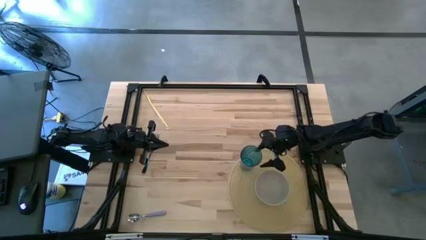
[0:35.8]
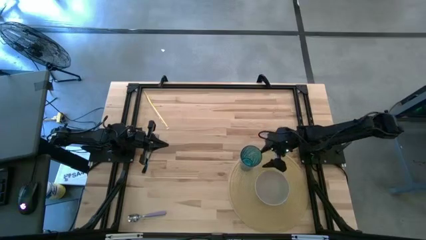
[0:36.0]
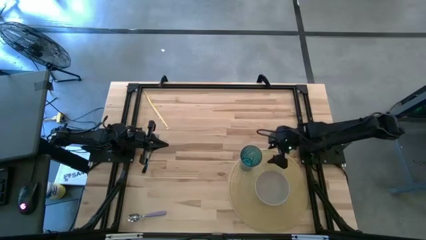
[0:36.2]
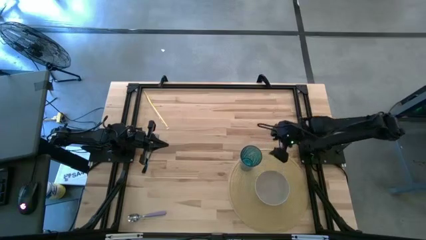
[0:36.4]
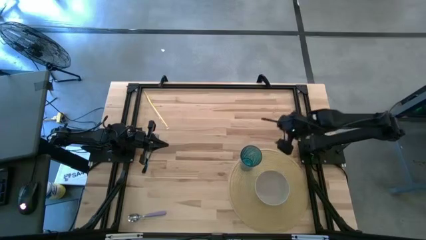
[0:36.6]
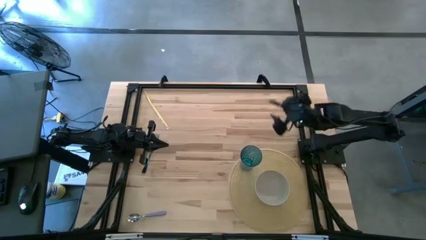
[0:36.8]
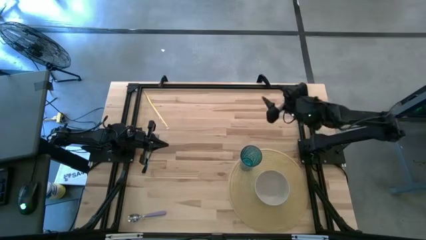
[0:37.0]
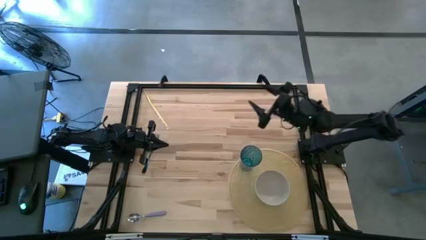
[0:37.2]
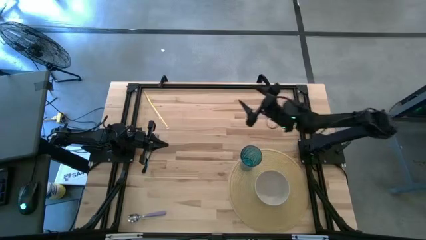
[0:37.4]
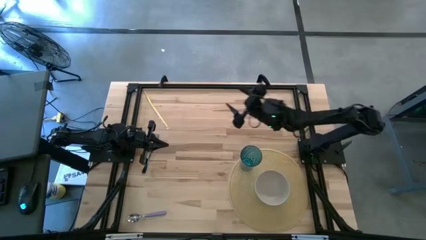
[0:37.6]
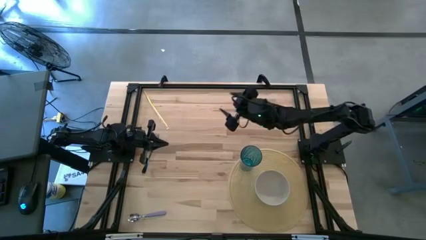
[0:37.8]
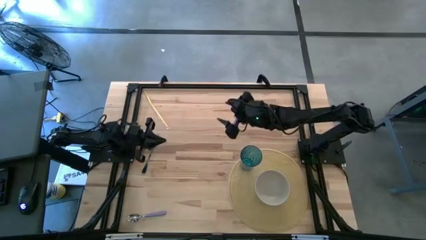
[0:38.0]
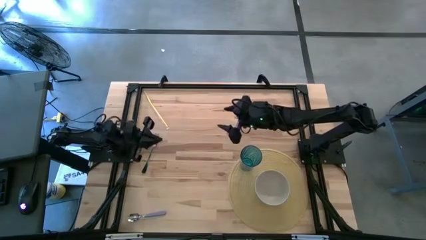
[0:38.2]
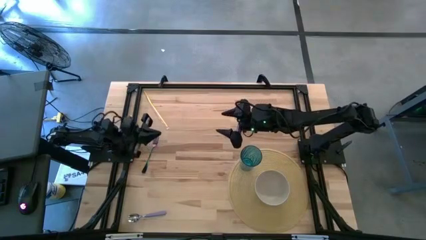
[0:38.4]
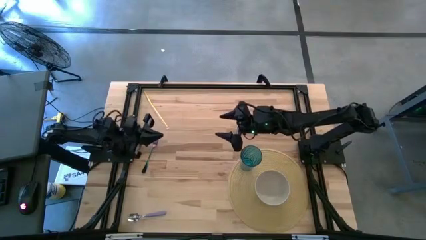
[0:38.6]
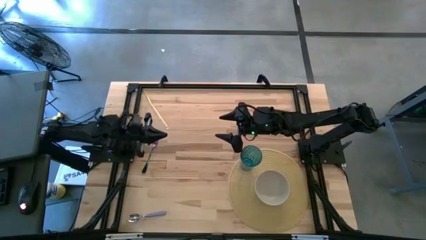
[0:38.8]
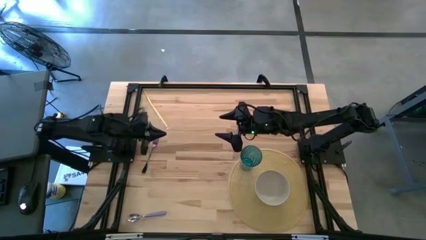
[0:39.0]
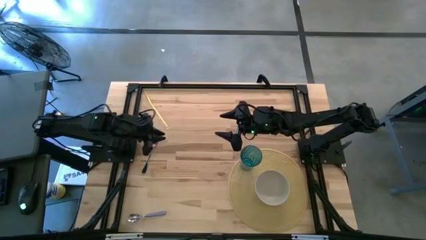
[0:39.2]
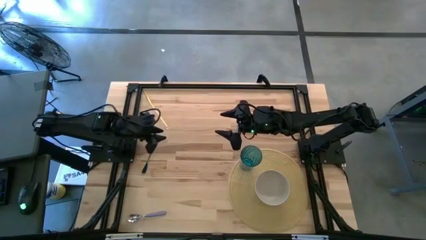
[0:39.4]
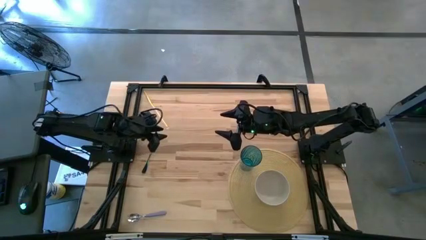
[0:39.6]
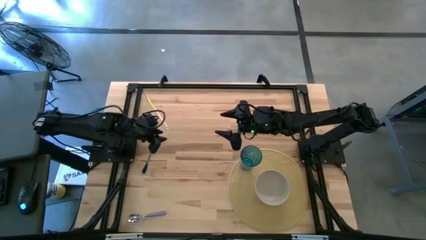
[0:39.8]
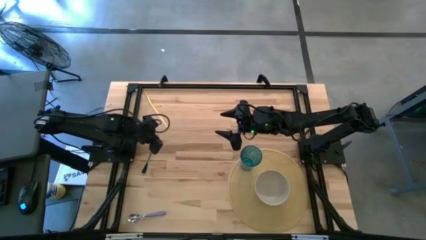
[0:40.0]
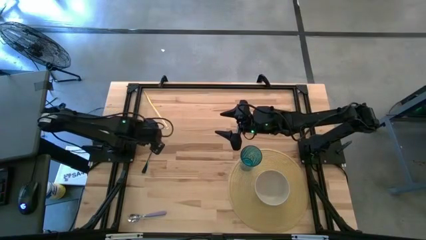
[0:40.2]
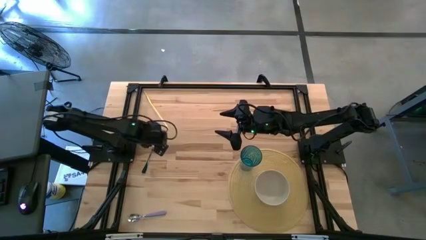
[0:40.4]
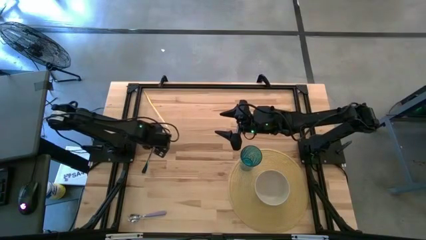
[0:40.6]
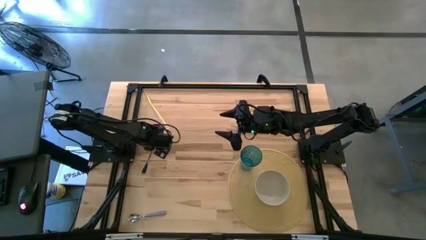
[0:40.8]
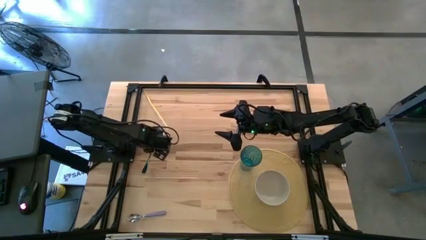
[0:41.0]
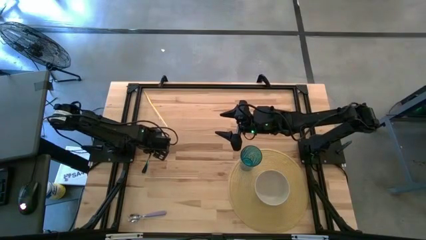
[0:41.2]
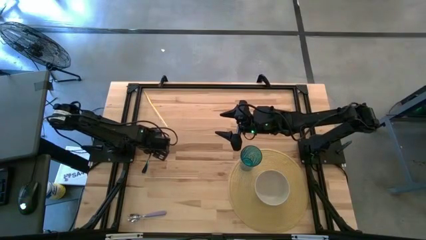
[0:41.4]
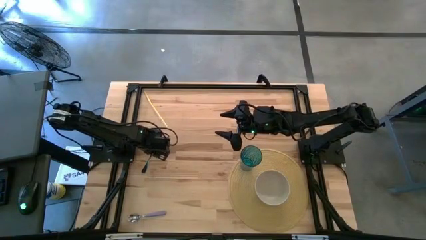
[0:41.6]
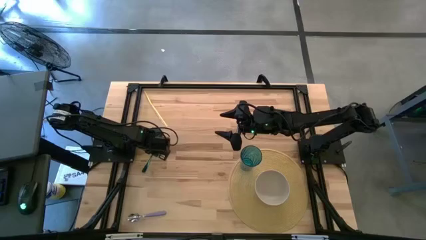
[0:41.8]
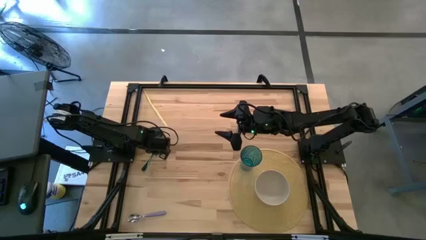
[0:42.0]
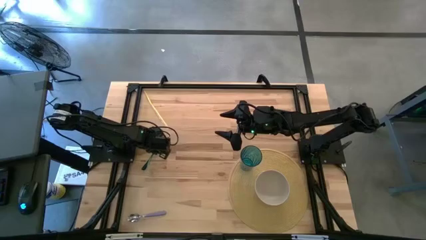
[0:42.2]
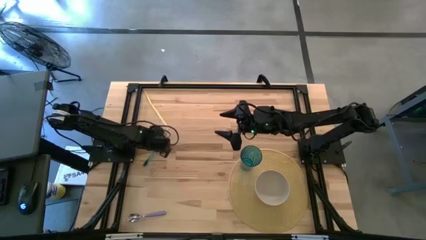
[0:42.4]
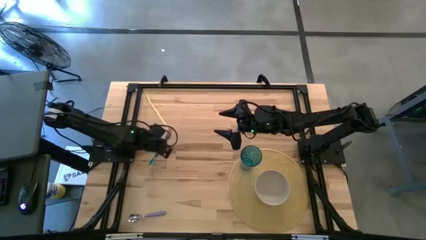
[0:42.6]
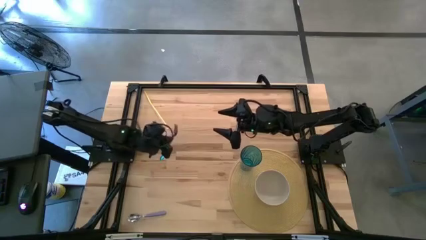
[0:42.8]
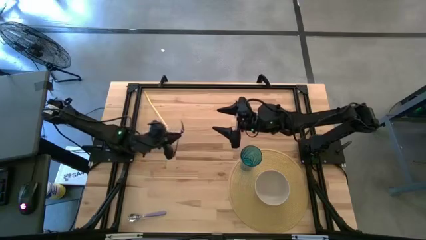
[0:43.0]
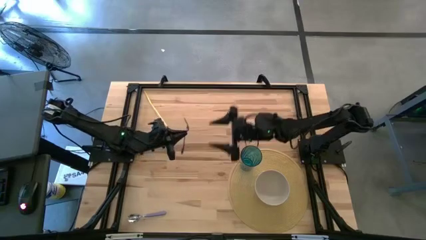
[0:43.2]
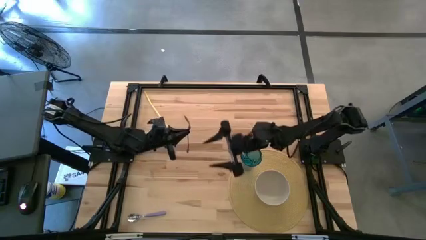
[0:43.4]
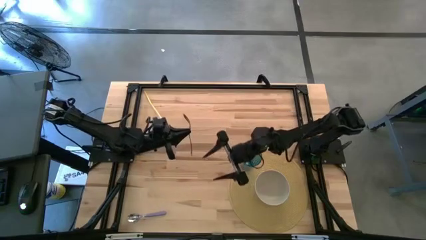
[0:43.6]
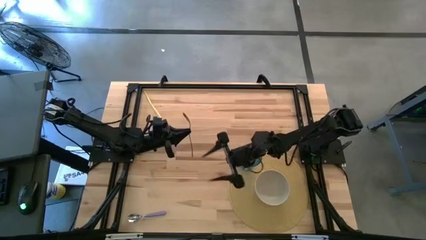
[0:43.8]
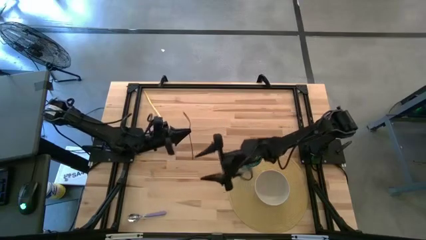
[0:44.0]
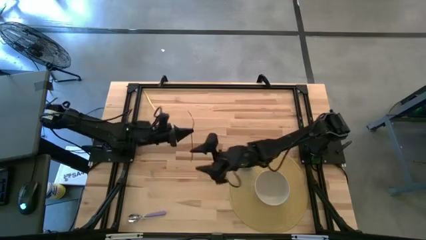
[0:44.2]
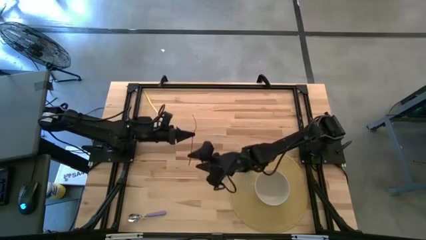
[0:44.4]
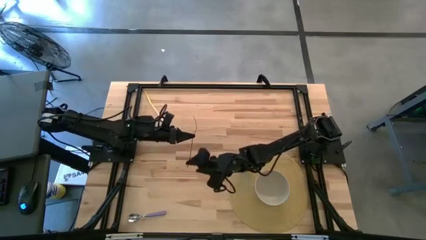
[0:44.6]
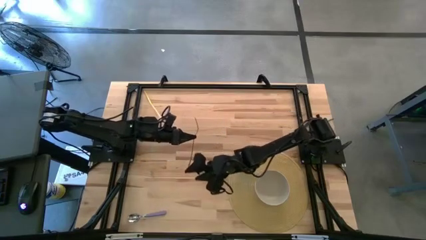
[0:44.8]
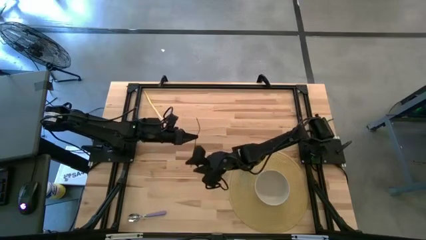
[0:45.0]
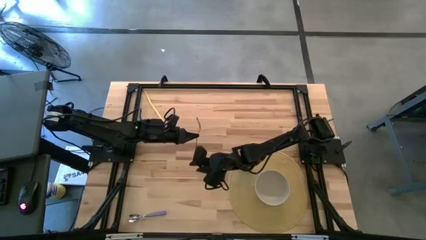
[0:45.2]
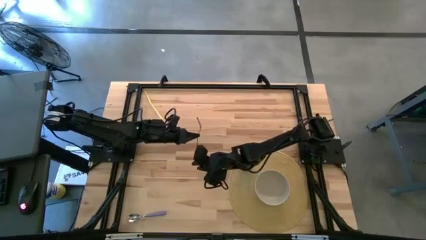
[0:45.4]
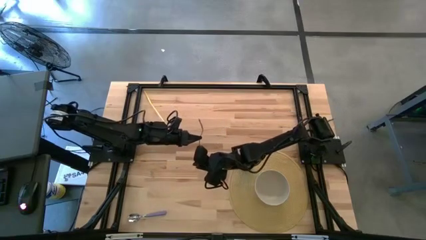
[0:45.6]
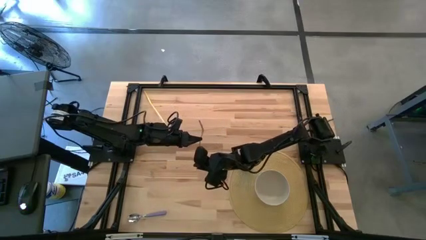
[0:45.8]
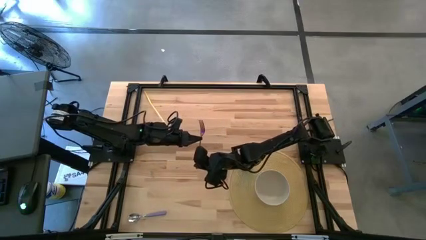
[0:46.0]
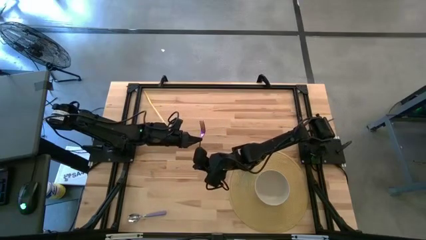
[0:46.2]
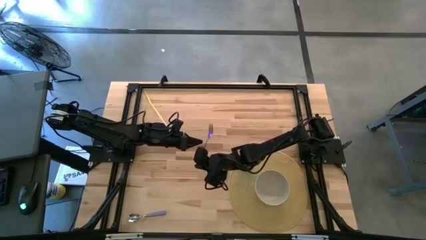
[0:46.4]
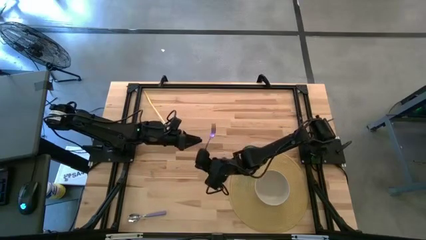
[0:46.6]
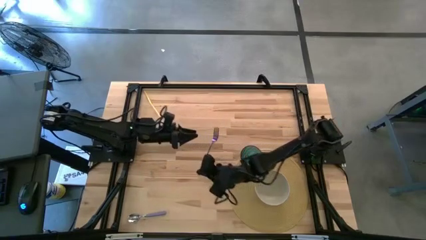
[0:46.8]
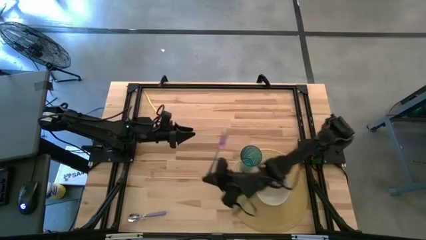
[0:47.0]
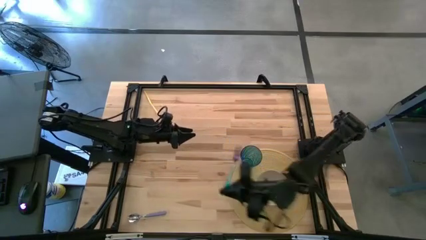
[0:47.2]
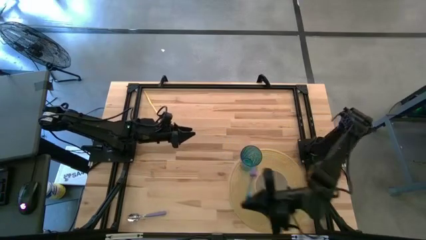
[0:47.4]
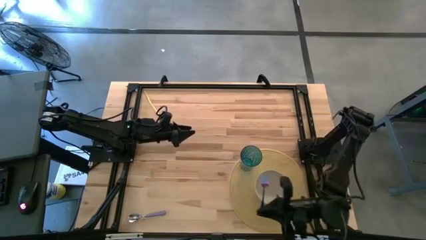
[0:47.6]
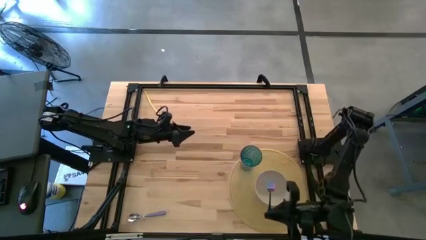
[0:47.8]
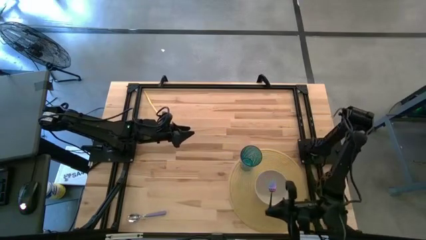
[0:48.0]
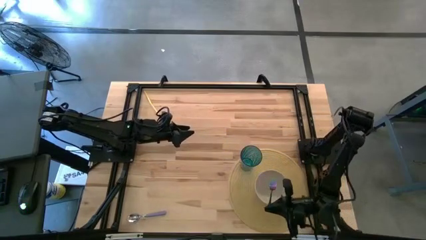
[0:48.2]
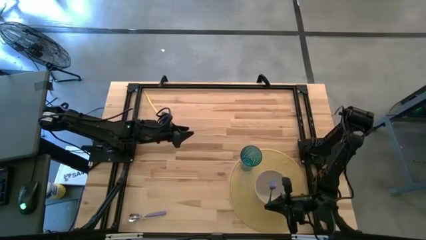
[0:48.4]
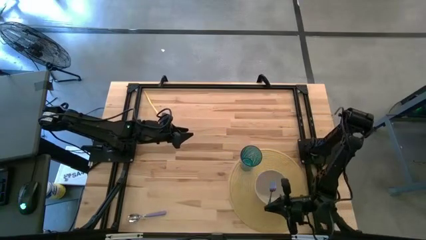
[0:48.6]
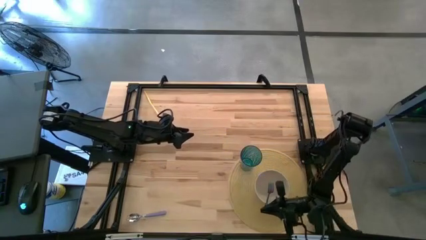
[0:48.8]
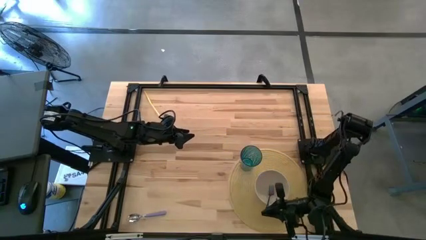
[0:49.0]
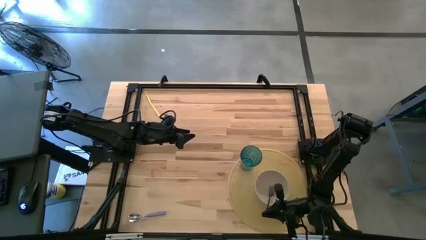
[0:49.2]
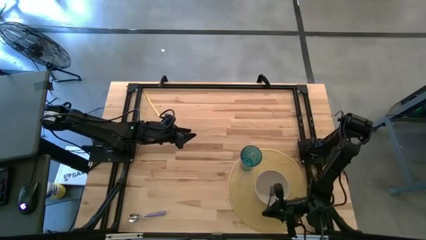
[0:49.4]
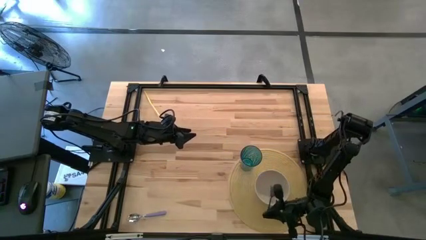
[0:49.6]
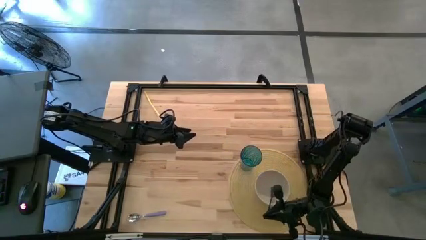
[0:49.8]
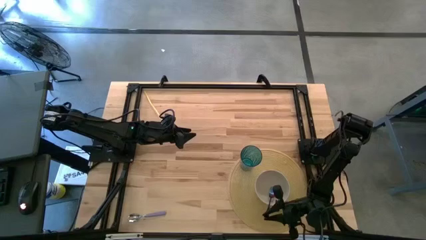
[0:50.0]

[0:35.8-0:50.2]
Task: Pick & Place Utensil
Put the blue fork into the white bowl on the brown mat

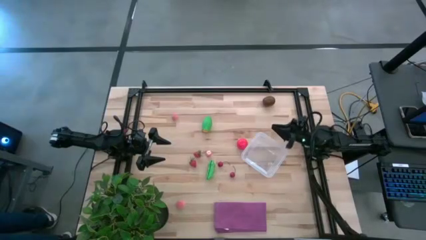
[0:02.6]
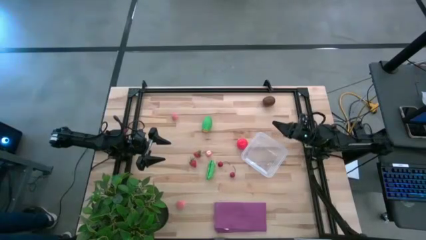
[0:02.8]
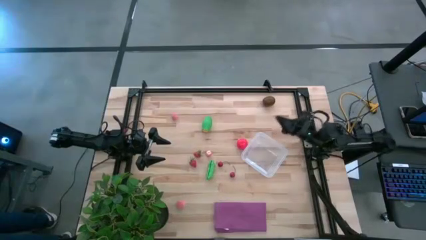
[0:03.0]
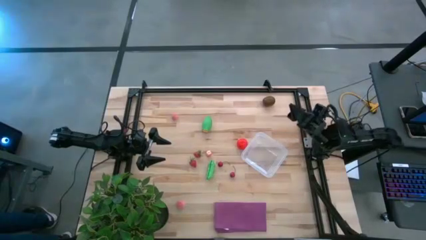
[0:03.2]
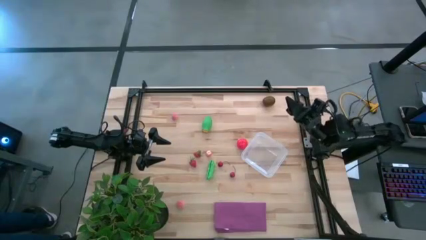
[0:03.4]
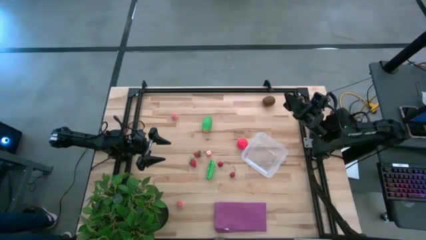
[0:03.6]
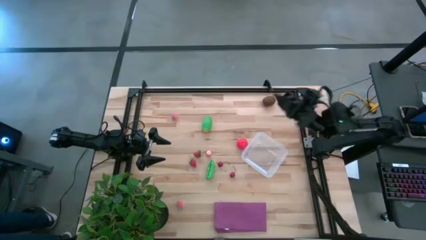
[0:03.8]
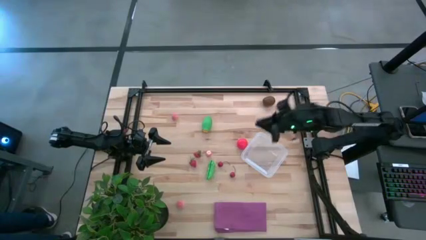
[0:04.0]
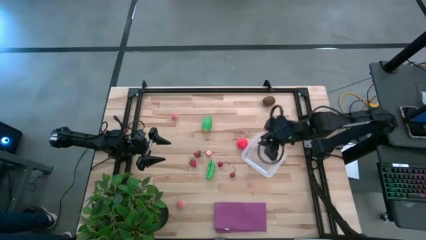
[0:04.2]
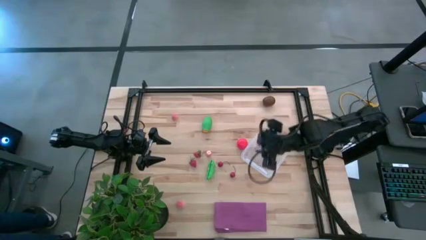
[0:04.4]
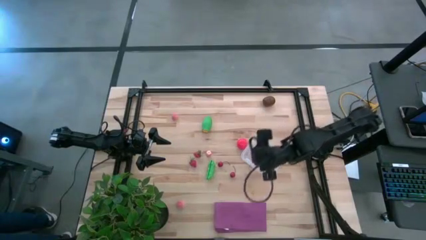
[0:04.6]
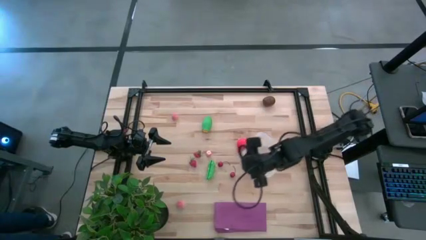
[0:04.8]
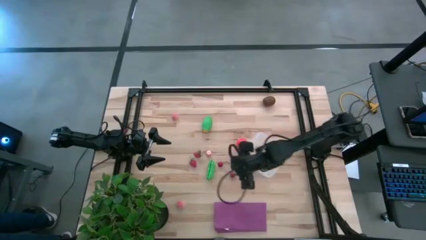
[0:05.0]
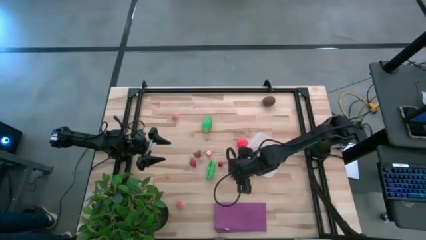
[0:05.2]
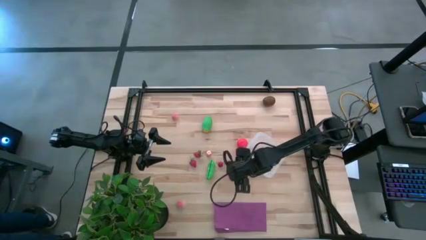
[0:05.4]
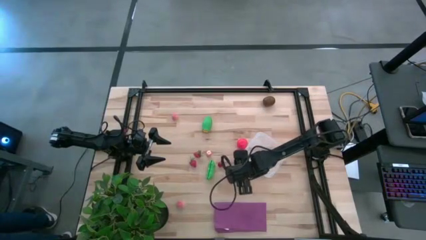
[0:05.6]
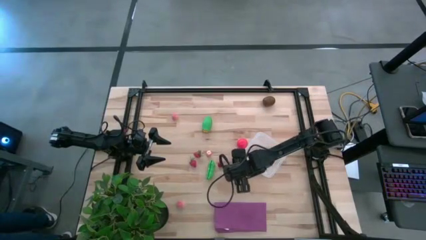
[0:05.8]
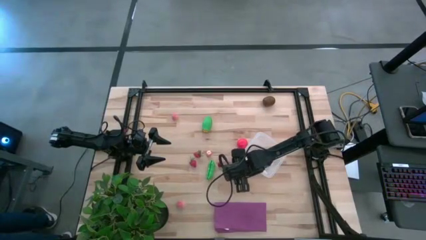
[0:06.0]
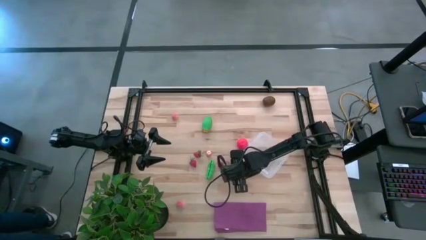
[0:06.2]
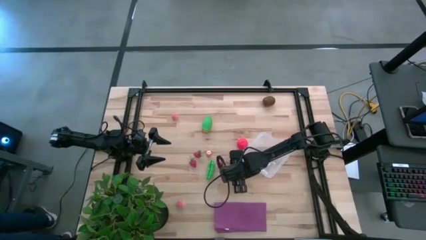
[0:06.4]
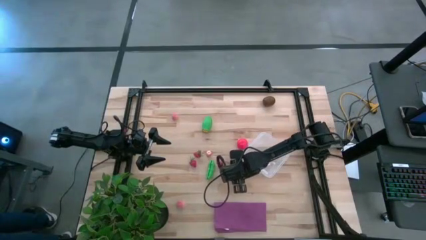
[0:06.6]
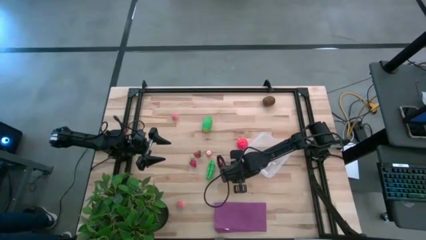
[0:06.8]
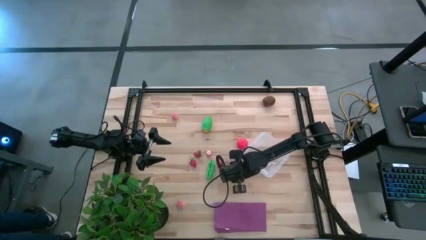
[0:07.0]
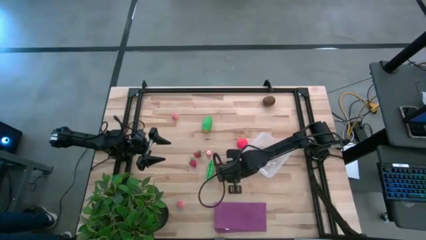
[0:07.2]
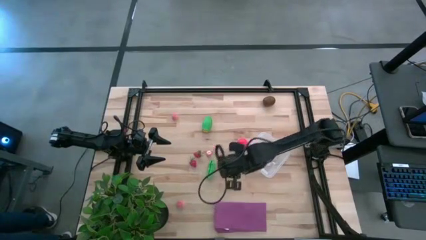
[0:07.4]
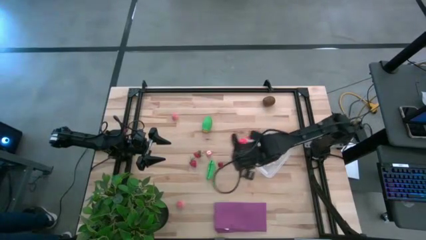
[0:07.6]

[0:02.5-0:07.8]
Task: Pick and placing Produce into tupperware
Put the left red cherry into the transparent bin
